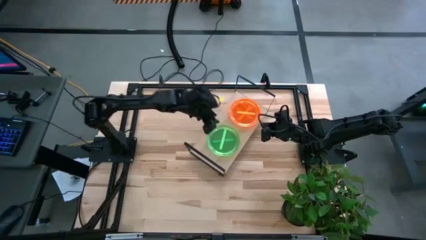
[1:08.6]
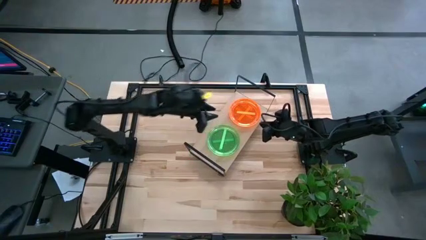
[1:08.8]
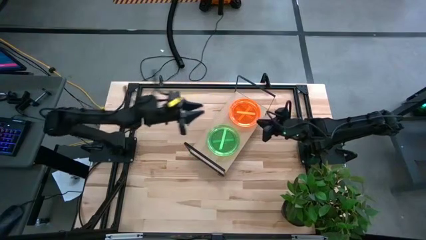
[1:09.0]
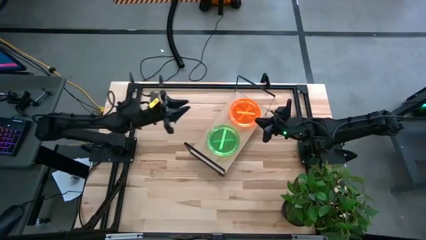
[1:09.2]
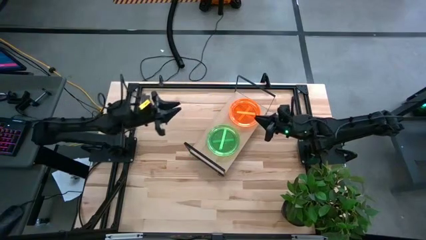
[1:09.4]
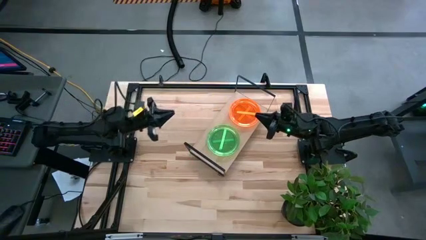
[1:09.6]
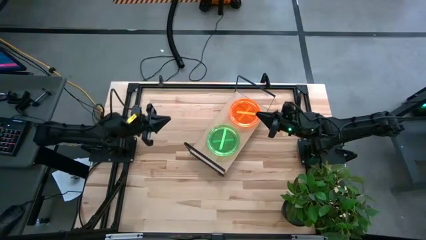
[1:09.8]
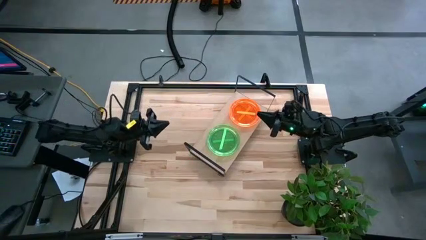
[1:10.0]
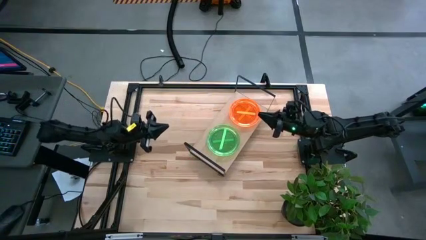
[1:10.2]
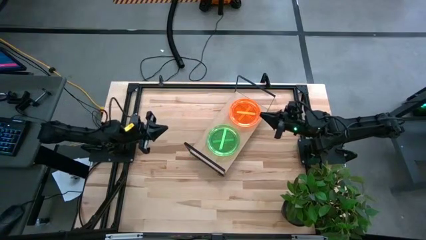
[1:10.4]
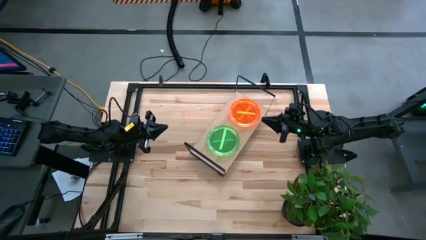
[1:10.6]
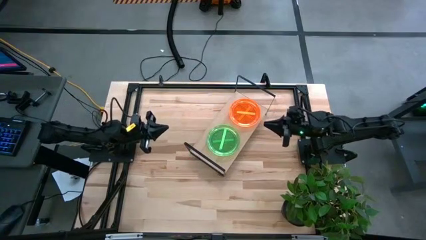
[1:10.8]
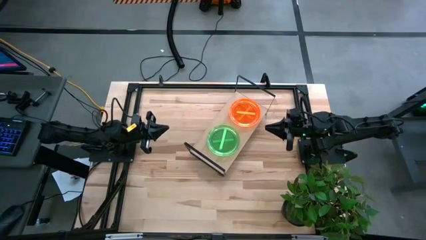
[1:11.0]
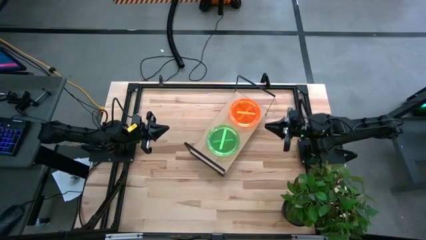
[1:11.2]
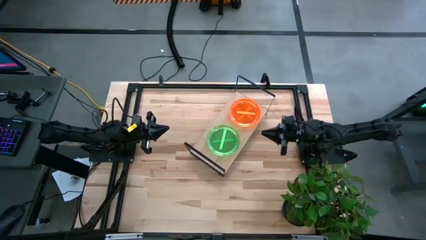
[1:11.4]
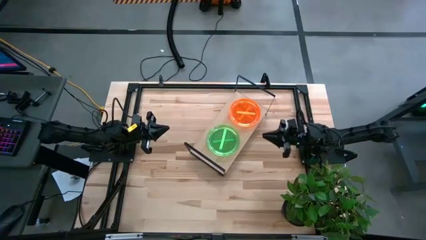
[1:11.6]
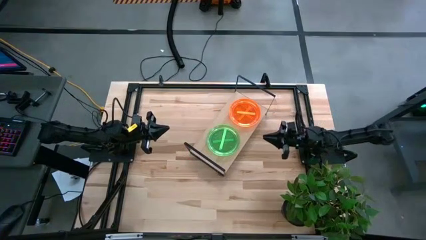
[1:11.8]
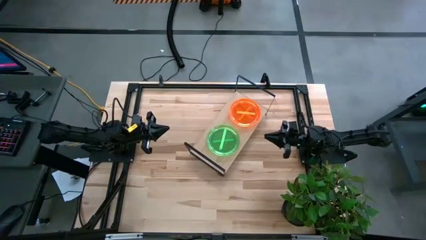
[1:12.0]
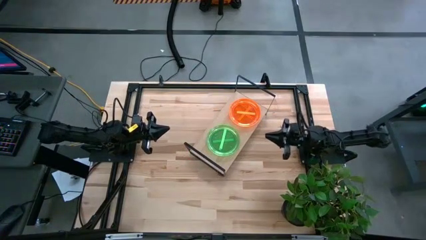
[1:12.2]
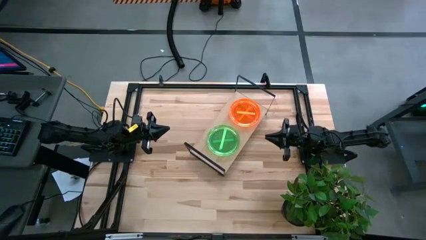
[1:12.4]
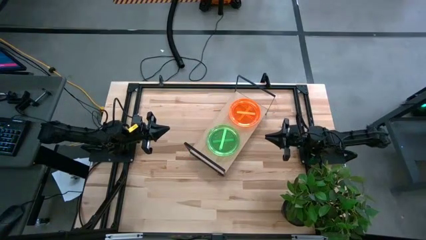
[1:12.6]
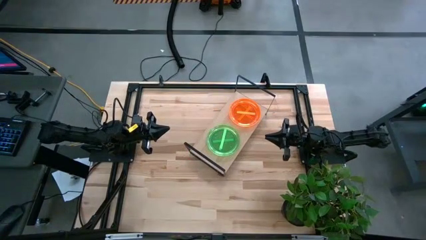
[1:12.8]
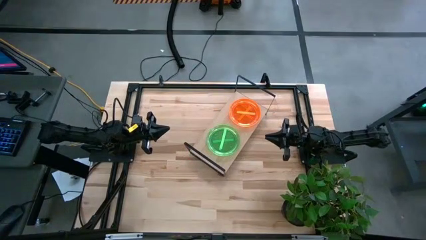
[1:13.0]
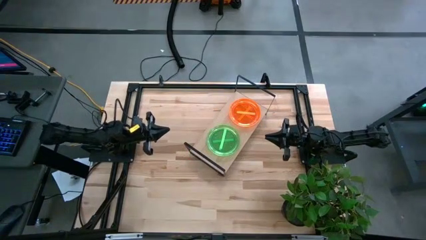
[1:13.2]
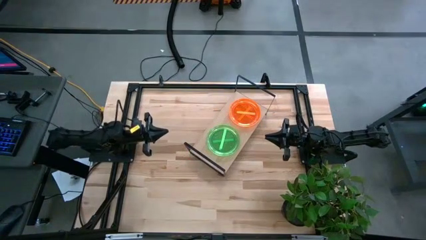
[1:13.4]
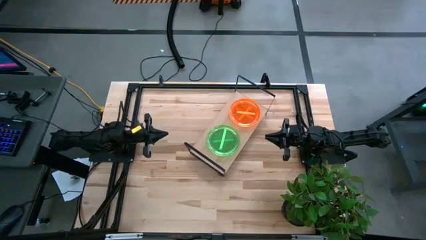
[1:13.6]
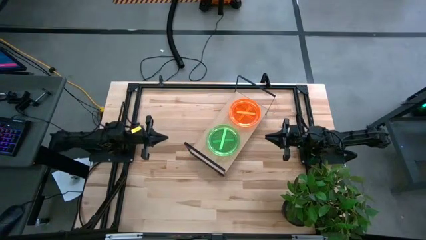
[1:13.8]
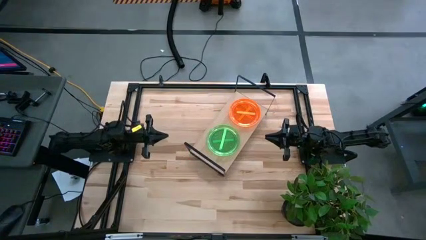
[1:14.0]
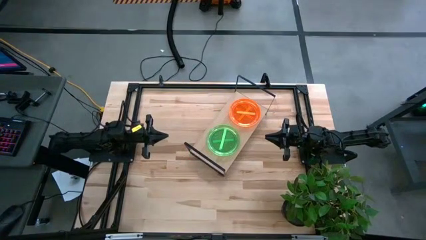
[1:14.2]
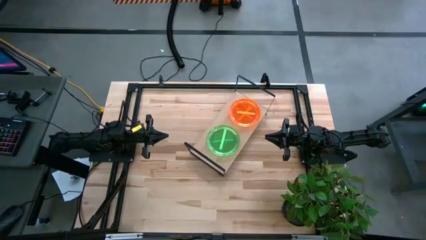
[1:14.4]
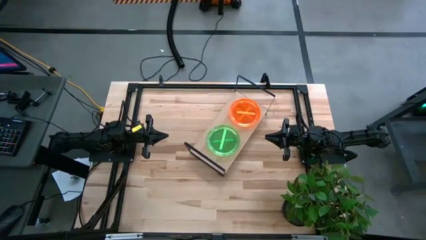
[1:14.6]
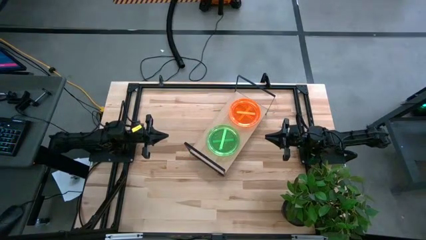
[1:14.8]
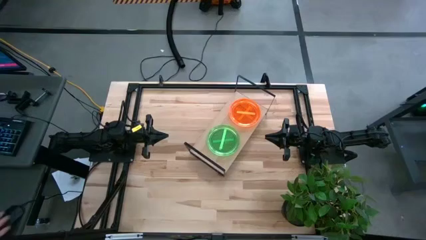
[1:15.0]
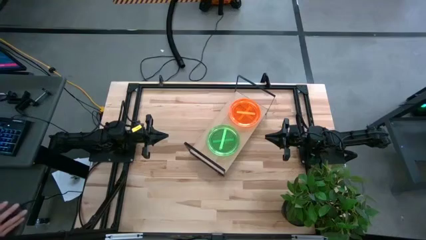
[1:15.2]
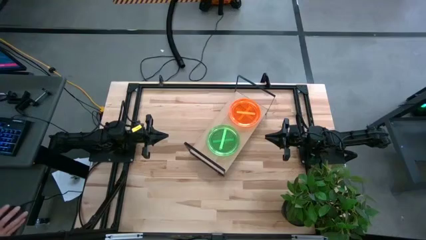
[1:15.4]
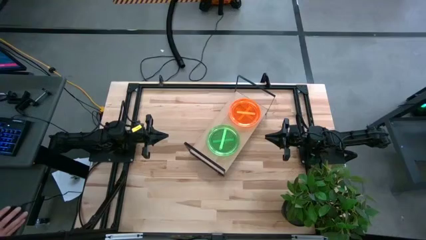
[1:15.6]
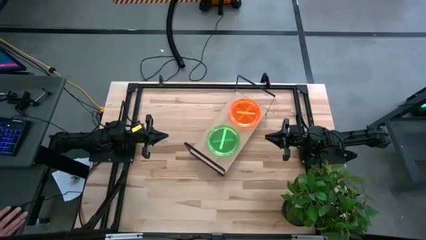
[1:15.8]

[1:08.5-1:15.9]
Task: Place and stack plates onto a shelf
Return to Home Position

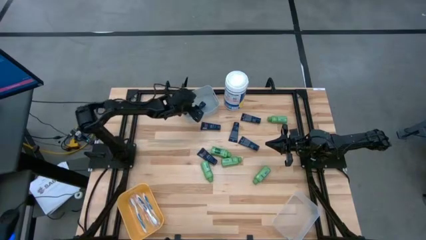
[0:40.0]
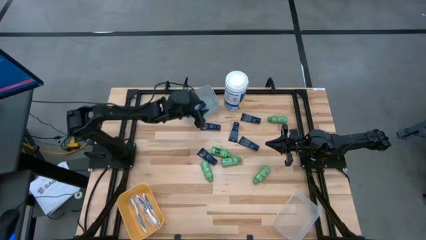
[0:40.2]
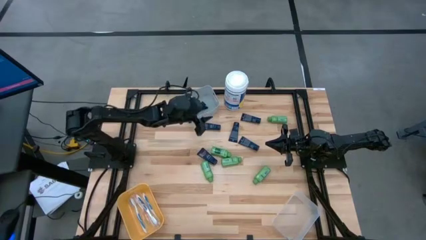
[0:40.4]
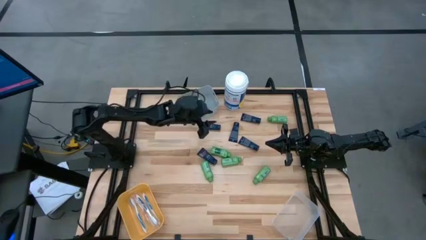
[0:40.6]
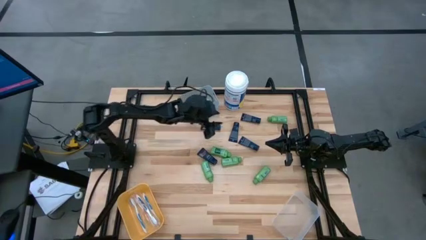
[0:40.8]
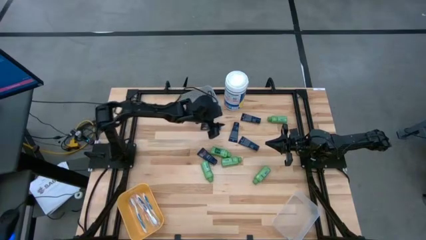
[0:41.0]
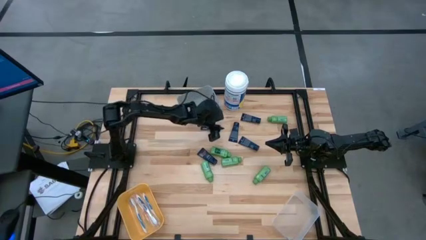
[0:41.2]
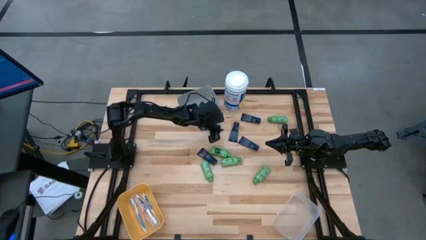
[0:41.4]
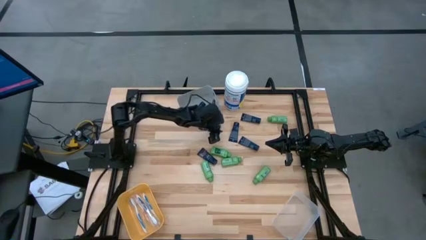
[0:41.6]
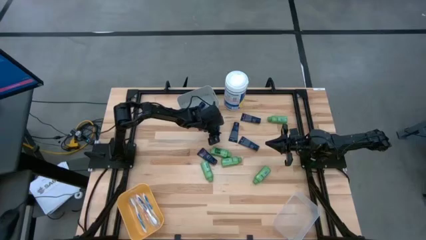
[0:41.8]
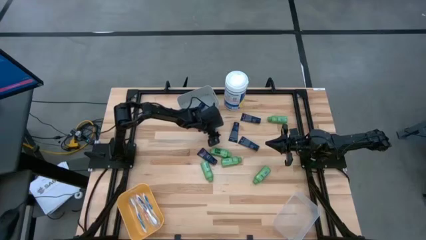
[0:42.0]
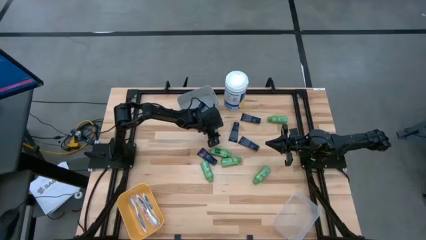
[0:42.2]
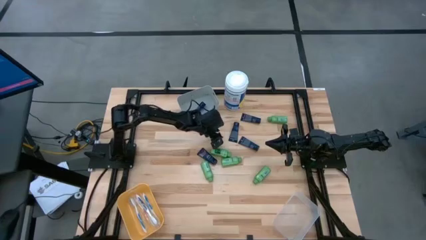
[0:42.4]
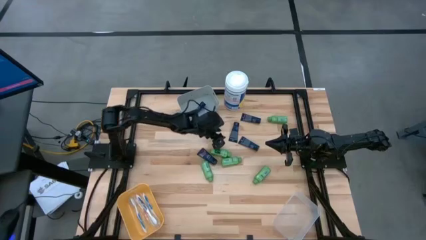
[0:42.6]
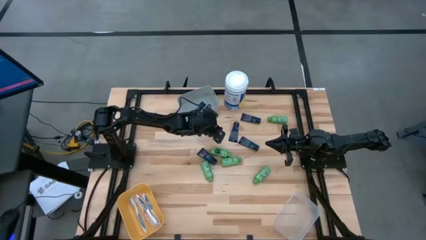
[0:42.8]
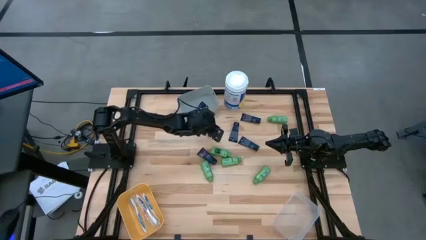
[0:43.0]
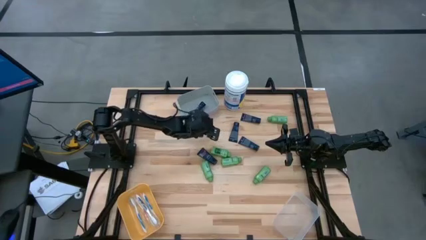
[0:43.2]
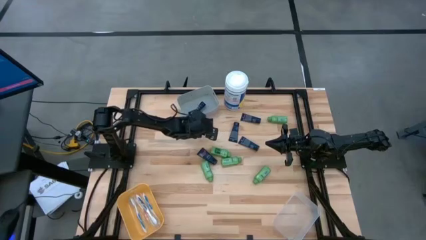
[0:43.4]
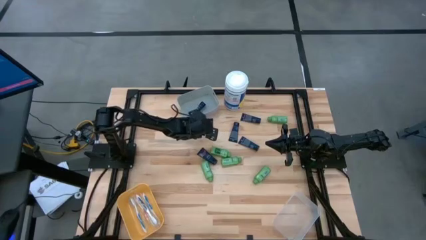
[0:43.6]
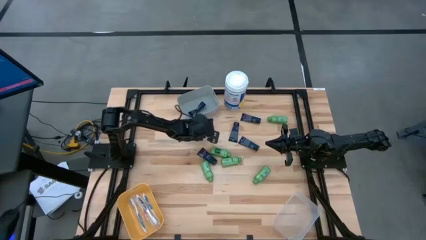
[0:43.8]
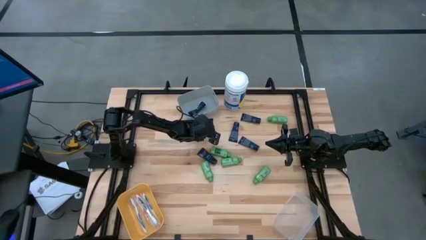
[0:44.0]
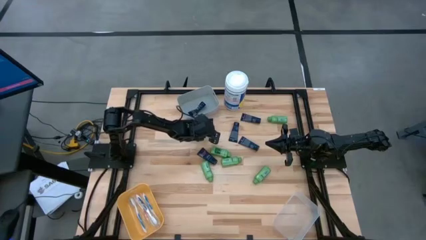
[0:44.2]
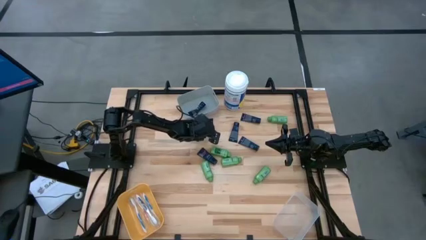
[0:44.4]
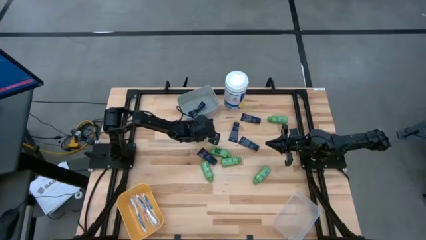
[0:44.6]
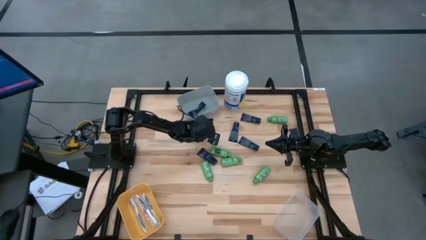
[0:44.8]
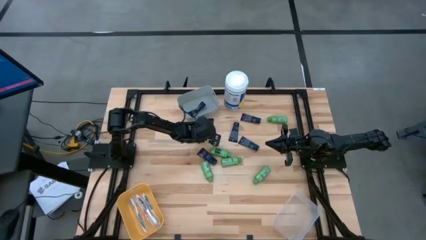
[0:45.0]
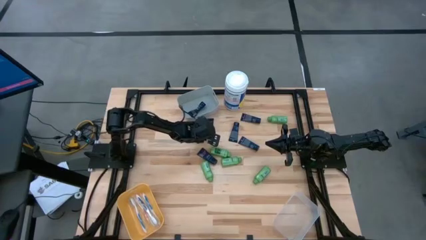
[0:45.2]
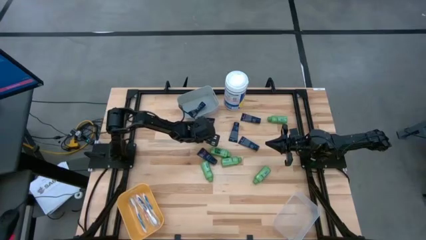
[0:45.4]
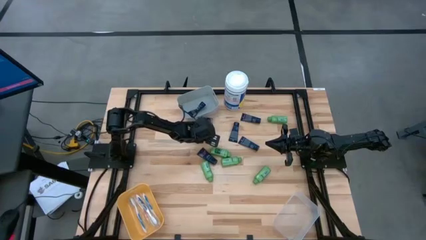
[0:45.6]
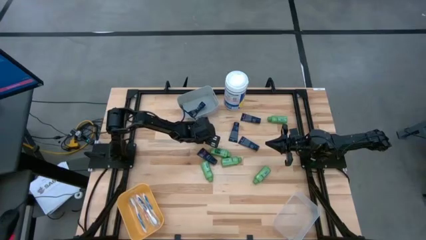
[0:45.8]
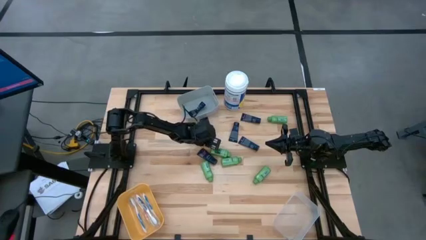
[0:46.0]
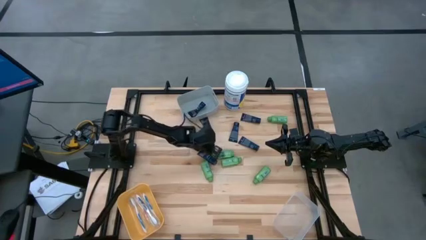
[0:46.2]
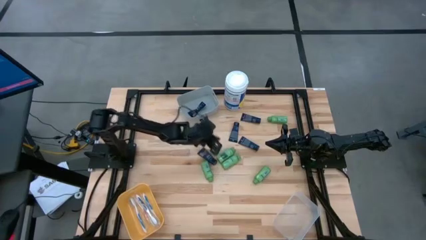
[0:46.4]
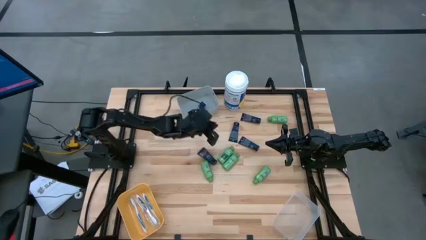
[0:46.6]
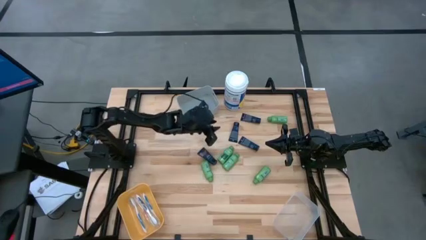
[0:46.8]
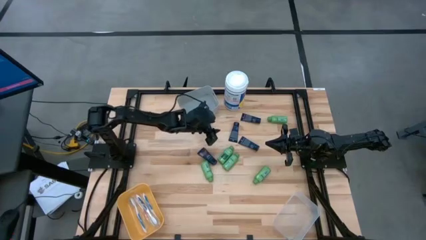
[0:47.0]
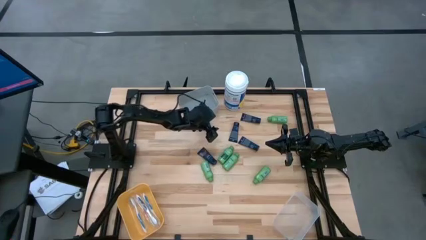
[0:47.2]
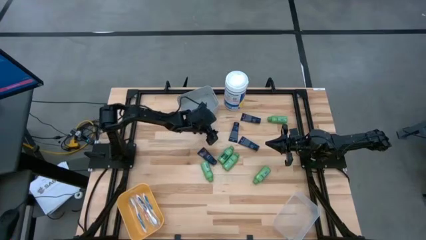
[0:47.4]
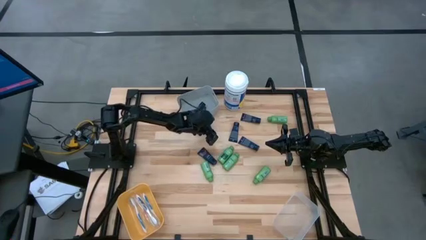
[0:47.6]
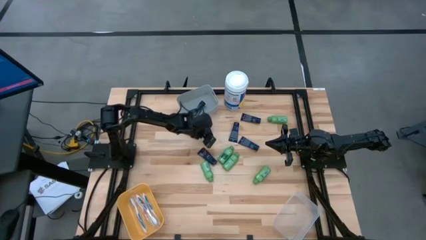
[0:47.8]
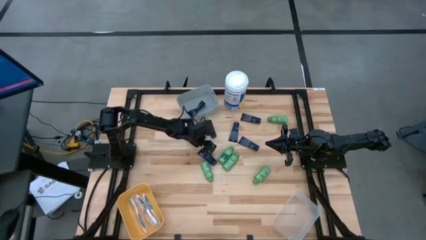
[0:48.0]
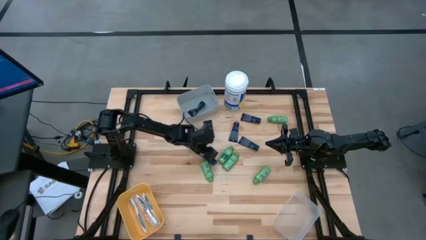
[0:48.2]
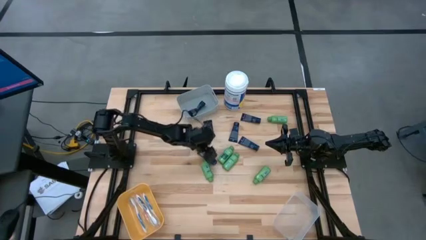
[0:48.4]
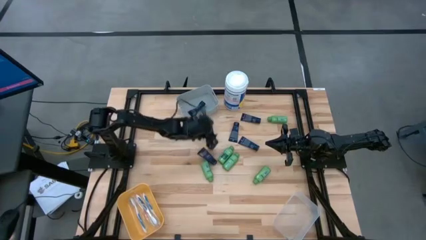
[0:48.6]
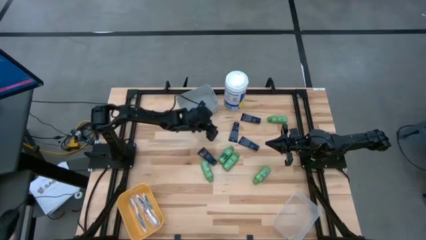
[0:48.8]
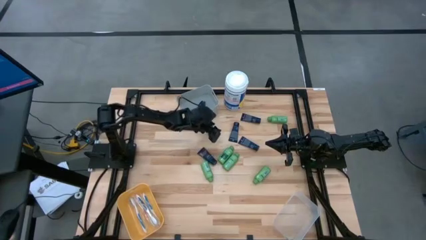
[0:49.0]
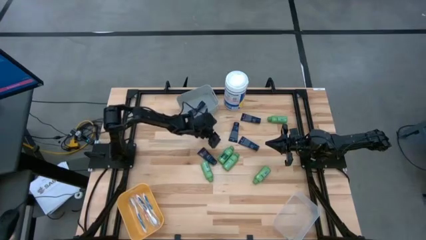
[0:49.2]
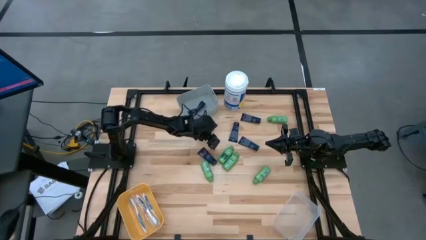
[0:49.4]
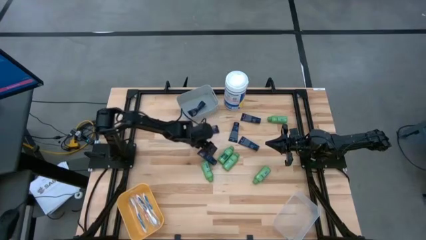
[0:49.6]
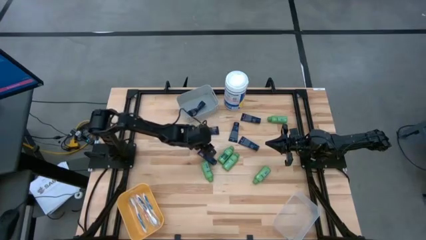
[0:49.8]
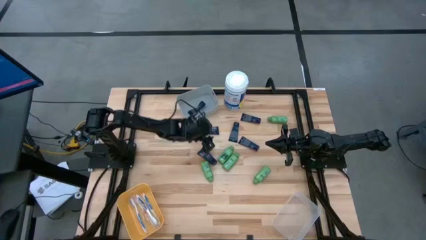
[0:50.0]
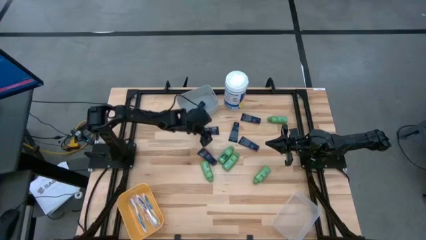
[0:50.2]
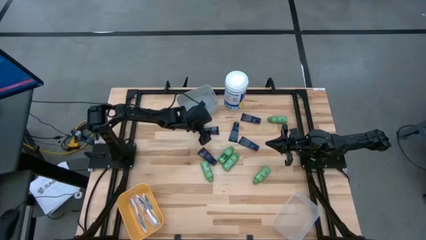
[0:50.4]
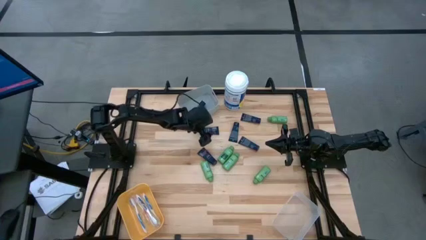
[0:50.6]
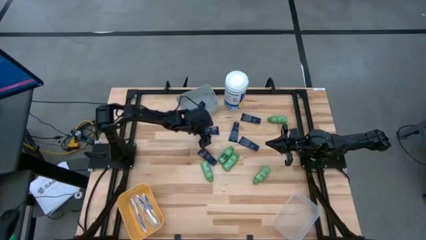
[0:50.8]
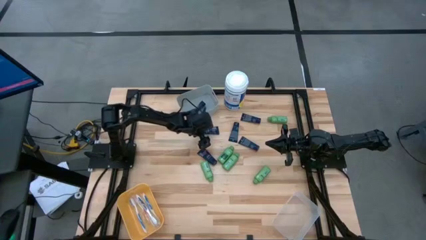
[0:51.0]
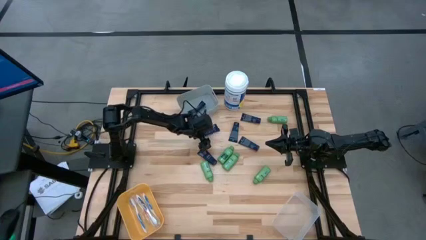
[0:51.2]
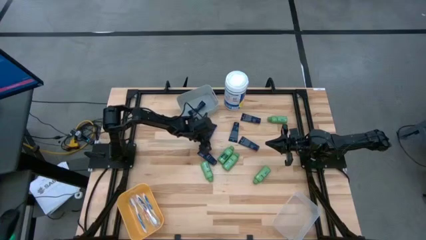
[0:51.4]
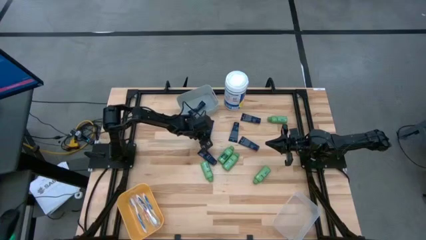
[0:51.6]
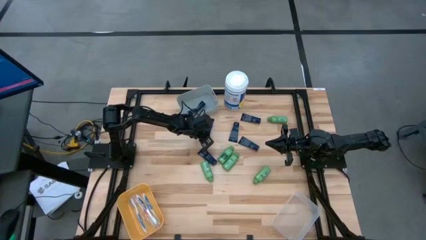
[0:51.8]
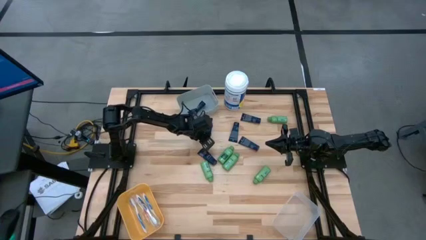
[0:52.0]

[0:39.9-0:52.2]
Task: Pick & Place Travel size toiletries
Put the dark blue shave cream into the gray bin
